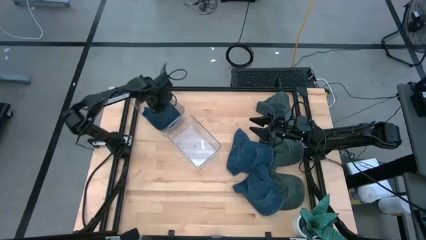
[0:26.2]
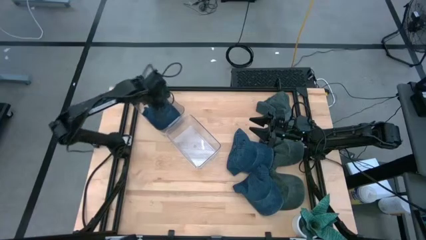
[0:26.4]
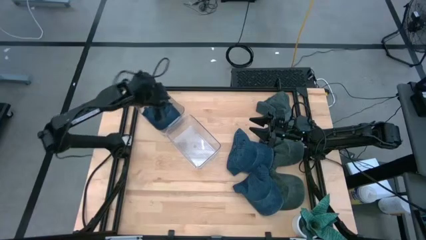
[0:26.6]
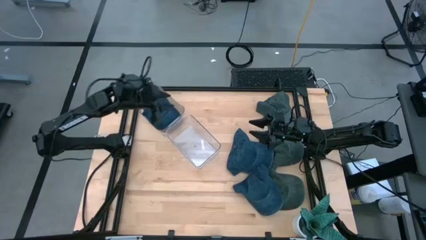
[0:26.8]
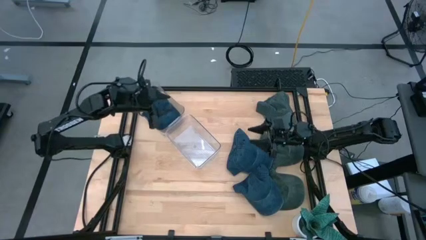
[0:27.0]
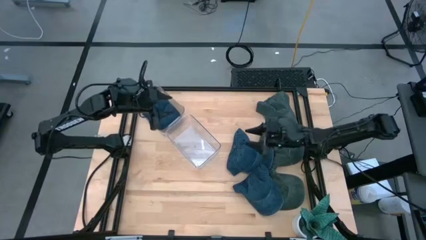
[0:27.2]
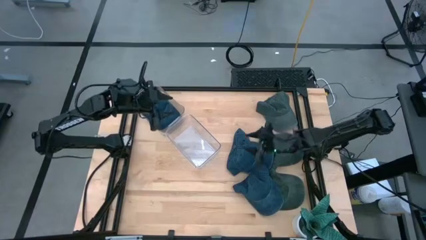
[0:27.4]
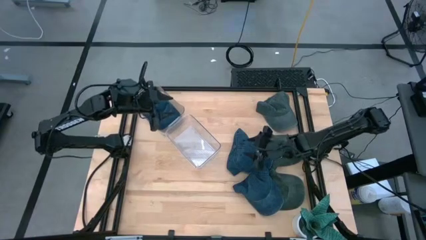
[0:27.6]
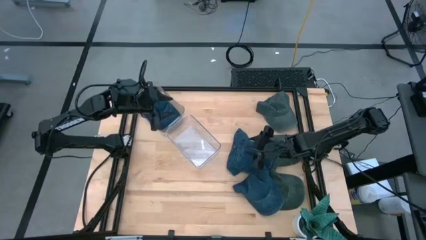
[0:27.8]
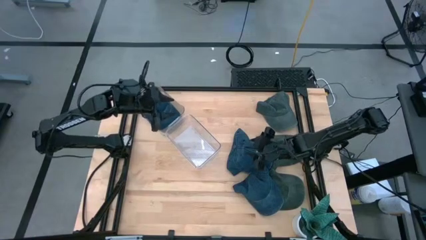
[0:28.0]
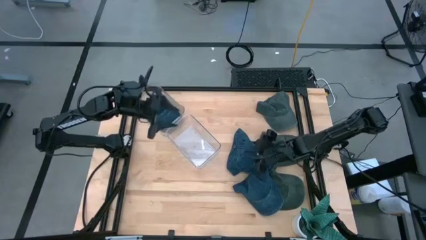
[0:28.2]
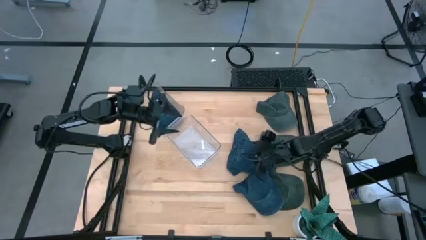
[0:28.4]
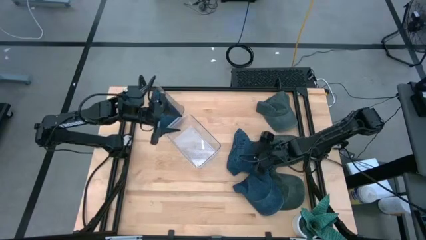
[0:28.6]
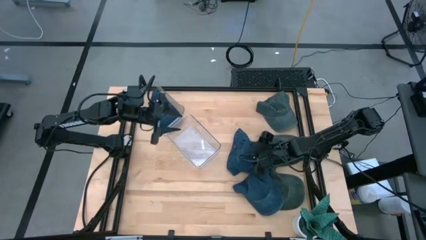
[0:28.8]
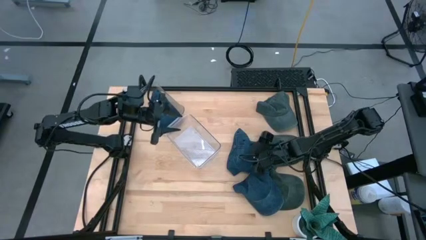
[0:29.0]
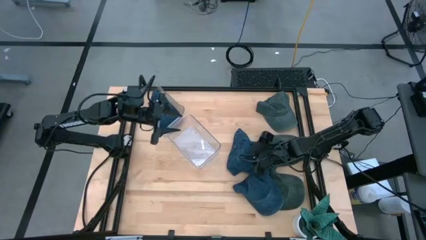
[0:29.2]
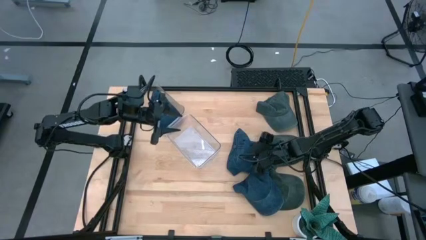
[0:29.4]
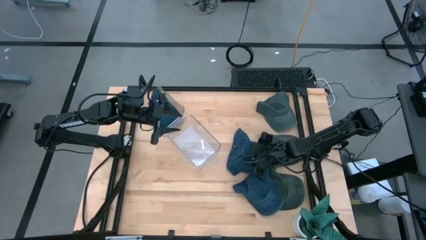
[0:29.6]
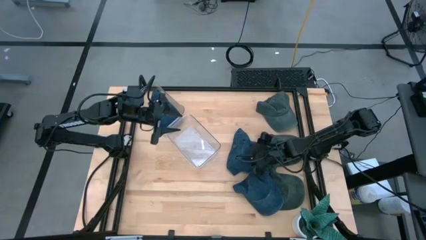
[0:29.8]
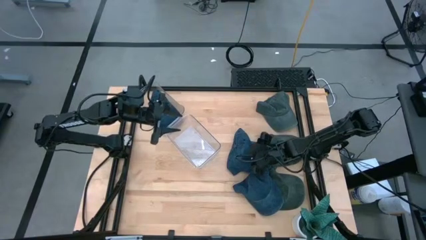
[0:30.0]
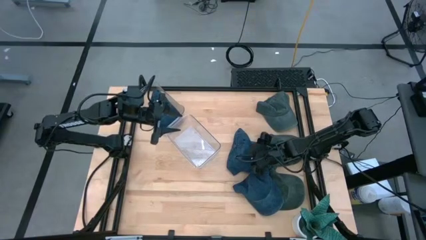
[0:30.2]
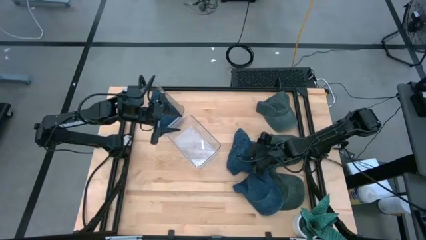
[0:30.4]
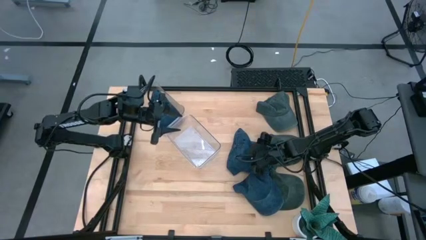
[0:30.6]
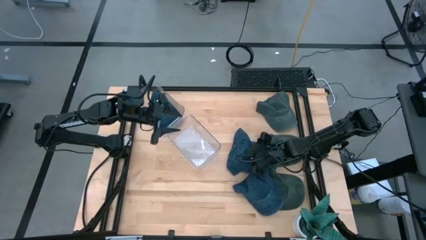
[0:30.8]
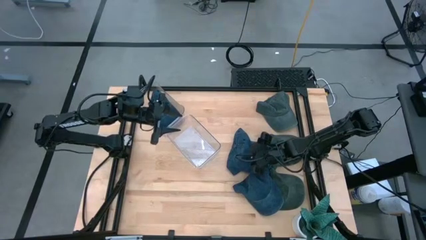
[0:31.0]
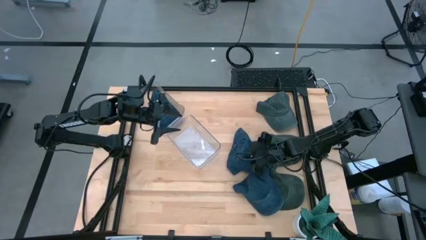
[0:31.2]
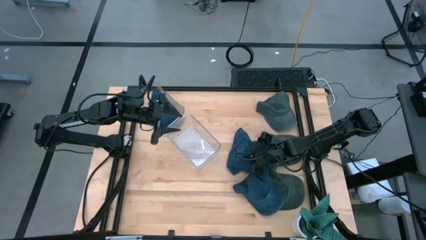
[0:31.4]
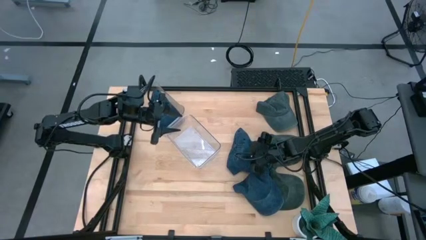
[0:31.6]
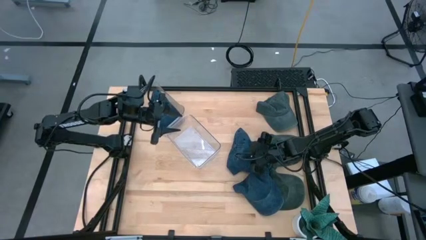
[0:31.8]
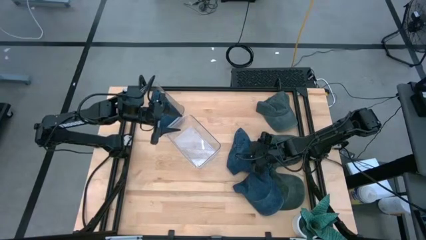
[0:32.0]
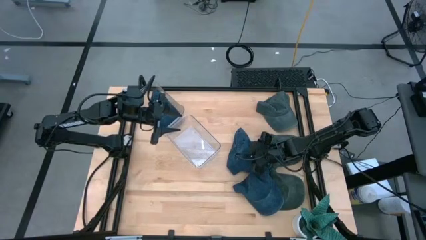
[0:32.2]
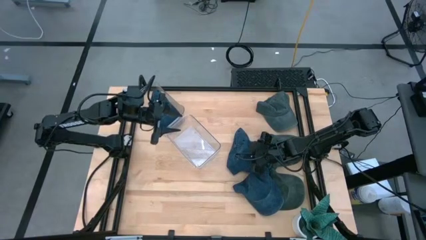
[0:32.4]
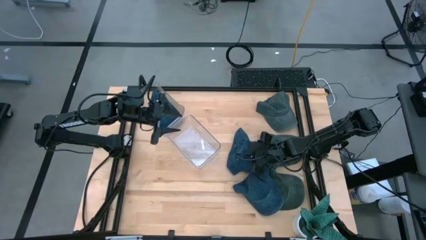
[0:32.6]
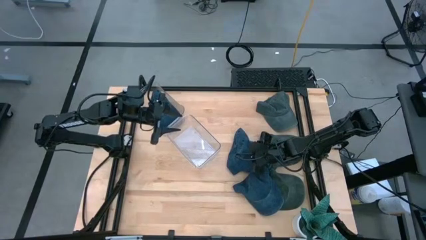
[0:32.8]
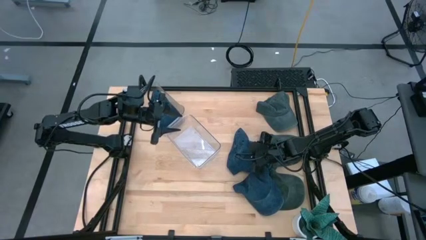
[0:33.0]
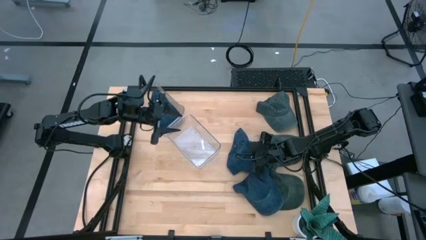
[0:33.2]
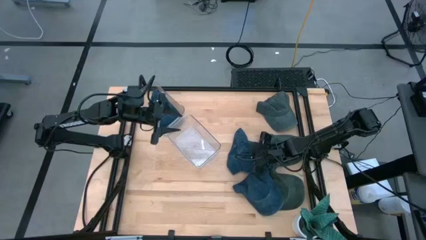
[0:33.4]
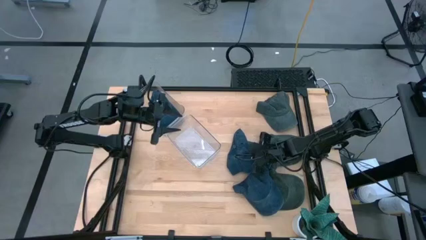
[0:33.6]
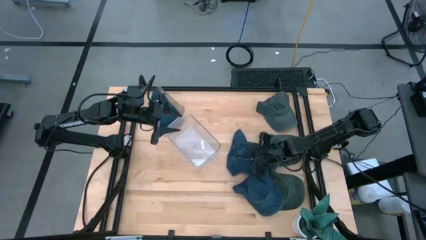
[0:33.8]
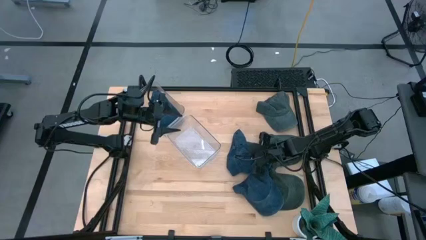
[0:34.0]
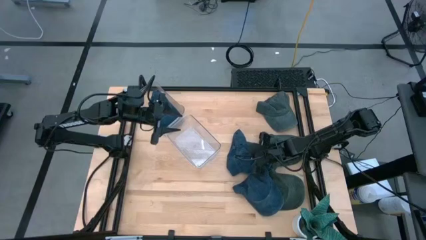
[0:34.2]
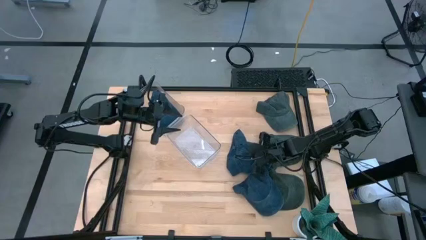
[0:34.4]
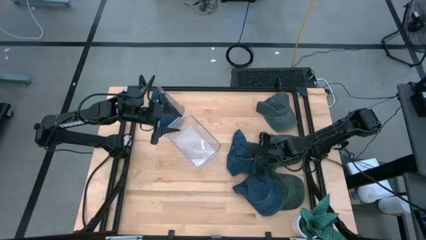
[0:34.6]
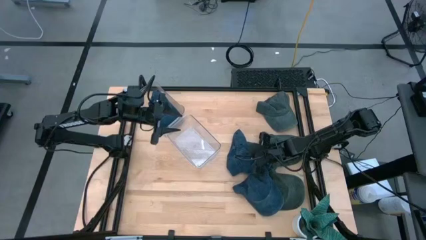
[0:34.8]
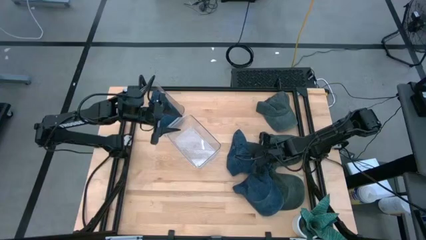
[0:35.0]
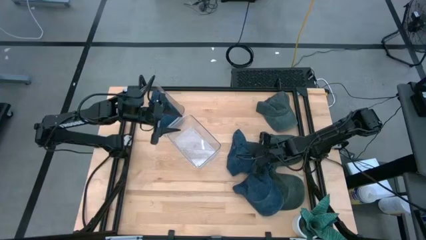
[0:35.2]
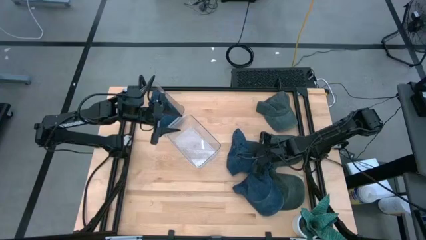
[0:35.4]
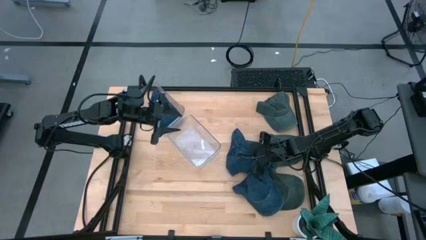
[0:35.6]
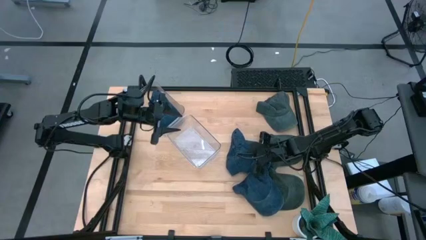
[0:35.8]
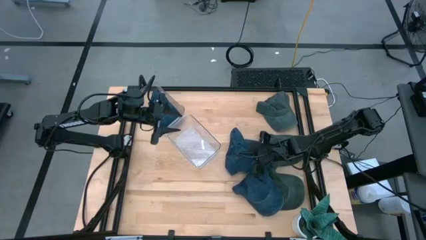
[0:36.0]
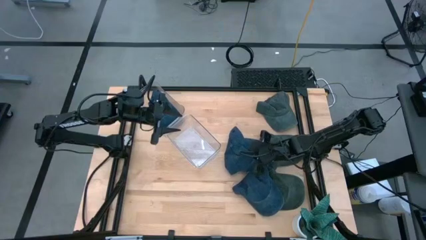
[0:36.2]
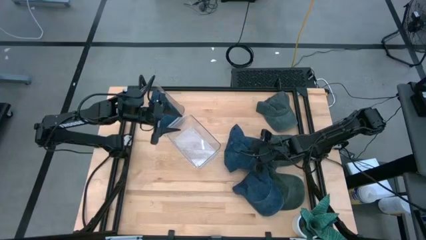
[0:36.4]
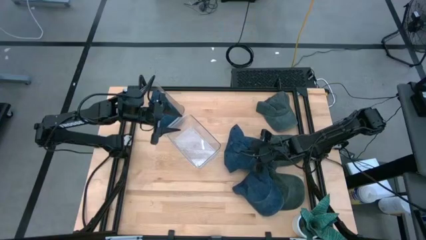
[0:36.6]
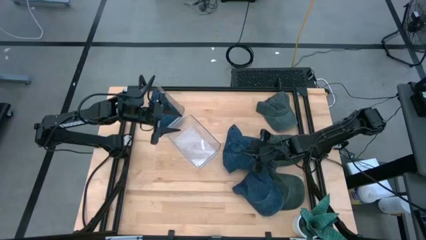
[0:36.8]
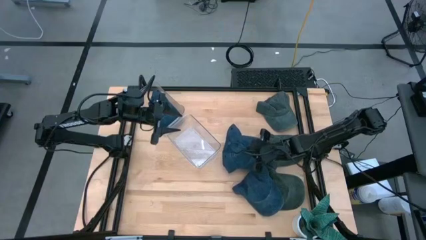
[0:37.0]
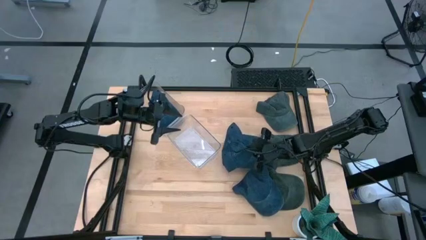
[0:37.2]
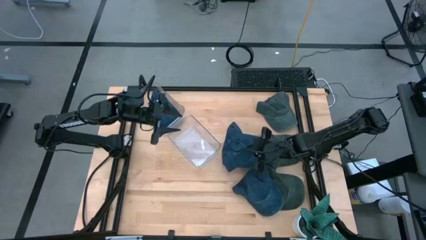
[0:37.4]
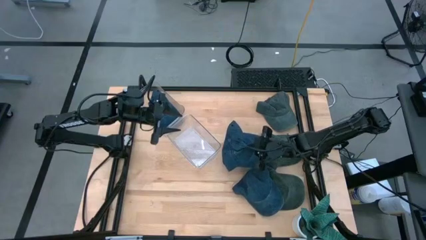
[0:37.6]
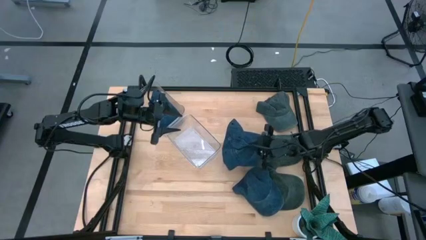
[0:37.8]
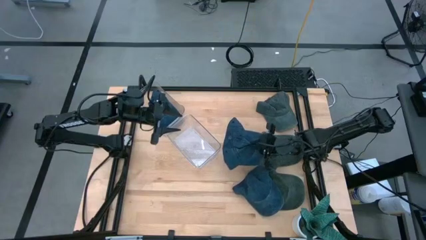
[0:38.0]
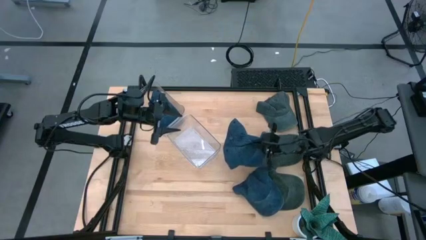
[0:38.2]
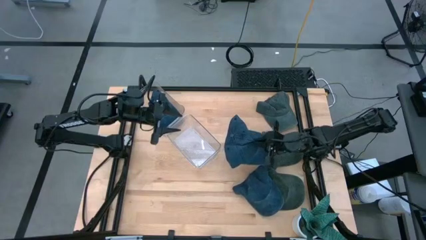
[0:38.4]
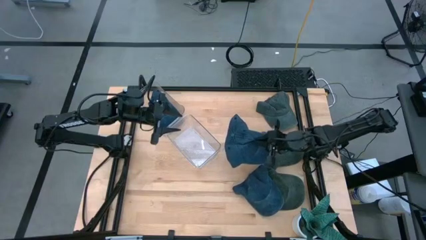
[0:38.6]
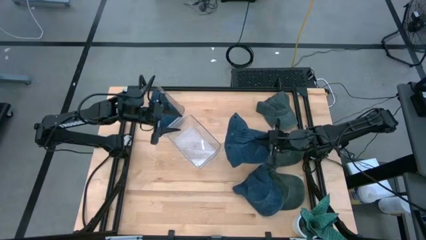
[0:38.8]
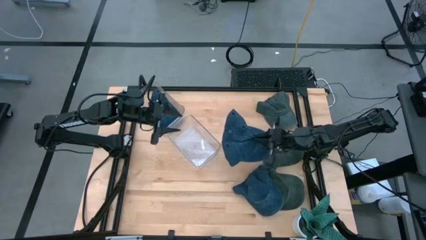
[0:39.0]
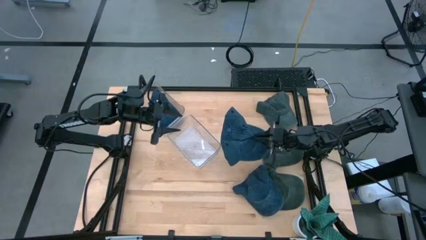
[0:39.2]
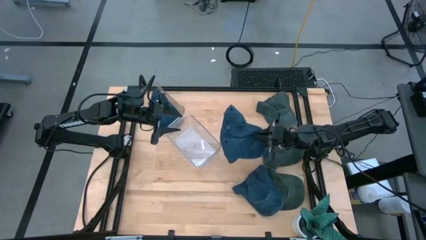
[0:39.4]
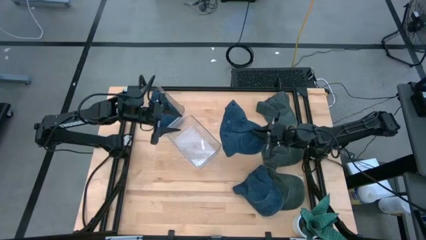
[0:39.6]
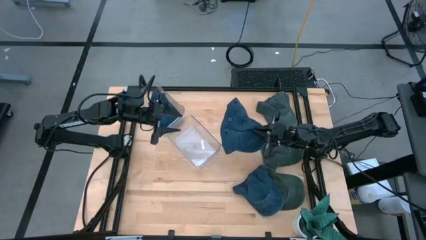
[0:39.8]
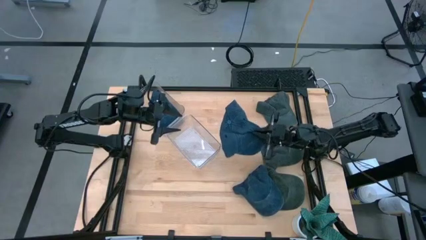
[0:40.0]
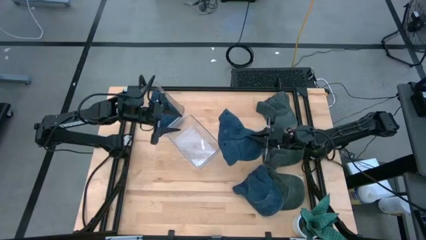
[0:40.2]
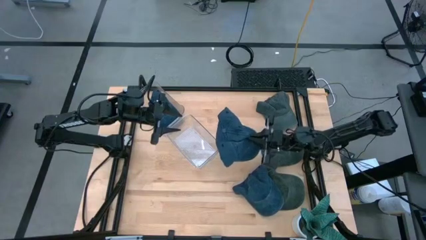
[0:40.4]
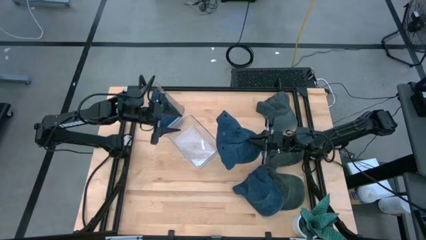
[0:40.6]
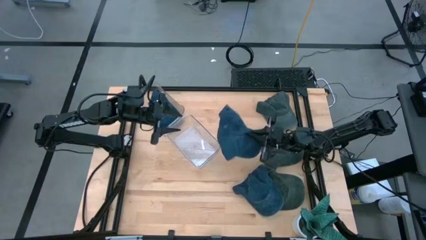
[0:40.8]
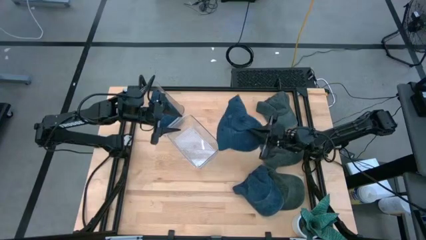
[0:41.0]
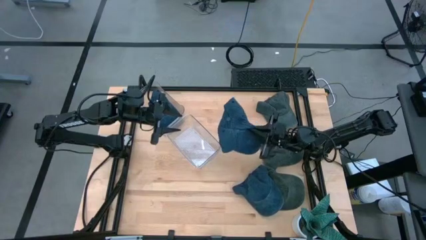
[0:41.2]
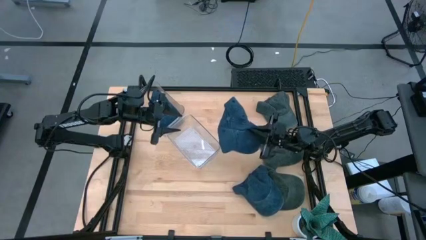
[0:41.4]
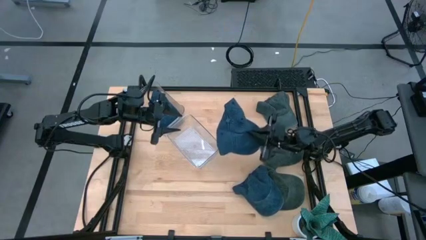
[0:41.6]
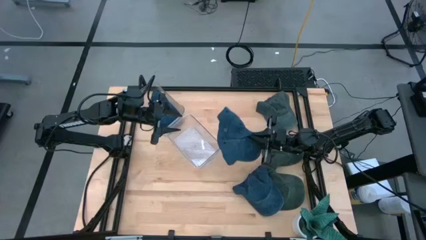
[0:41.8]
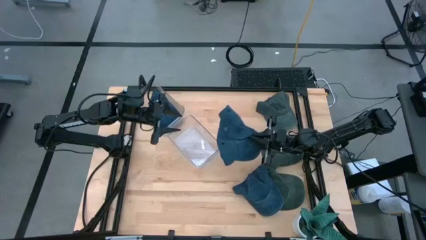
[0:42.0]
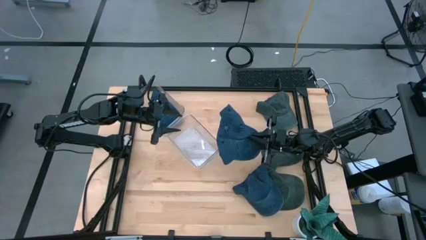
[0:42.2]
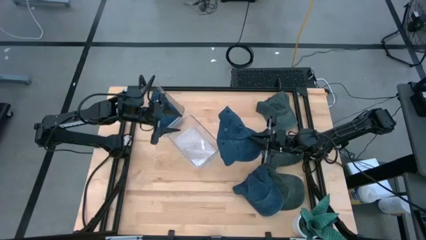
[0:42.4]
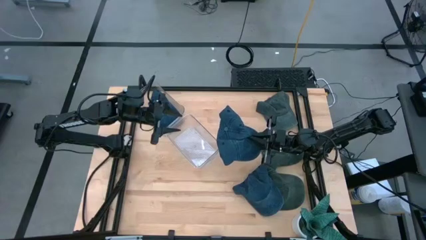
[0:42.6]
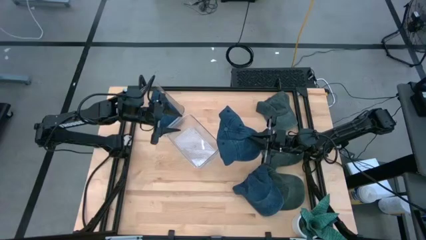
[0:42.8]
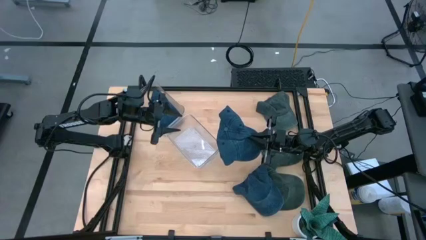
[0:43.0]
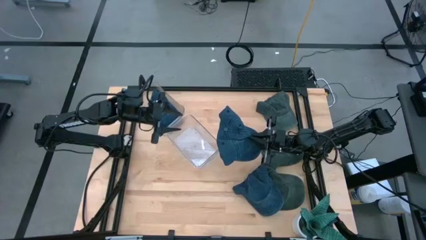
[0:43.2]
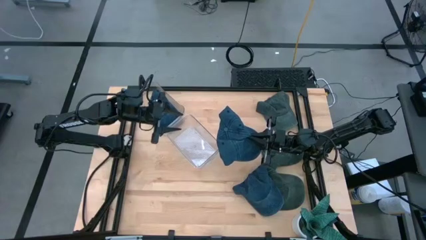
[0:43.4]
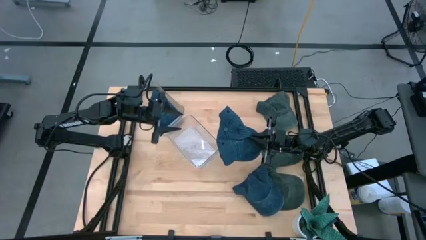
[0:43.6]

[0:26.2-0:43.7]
Task: Pick & Place hat
Put the top blue cap into the top transparent bin
